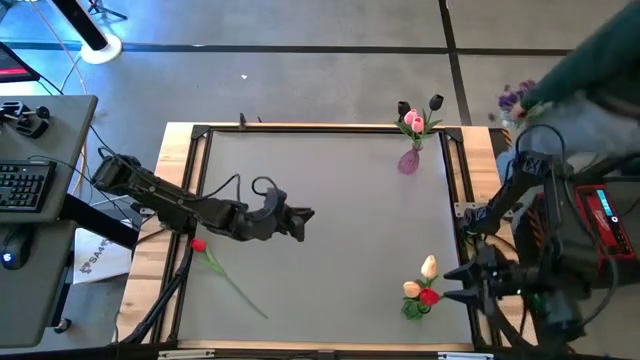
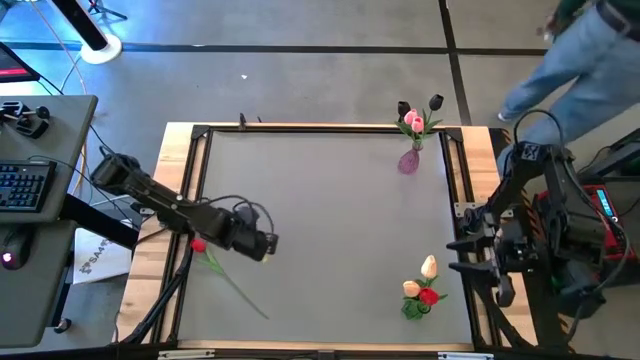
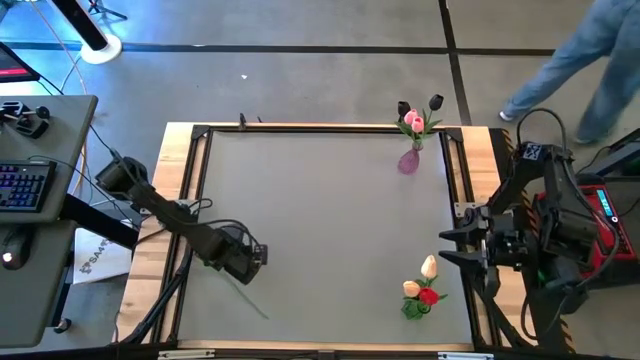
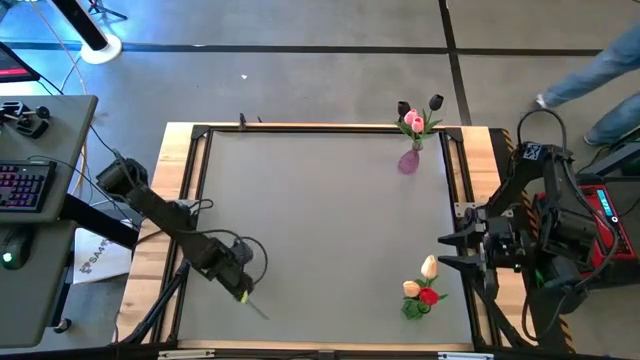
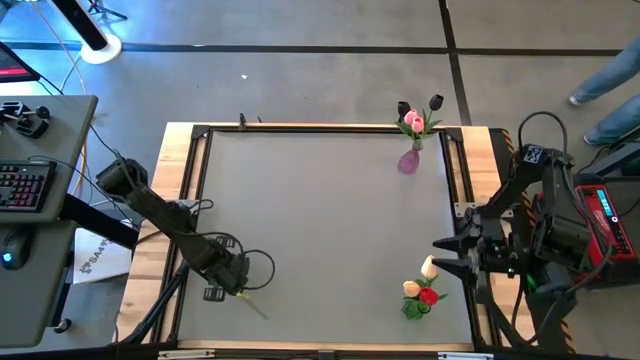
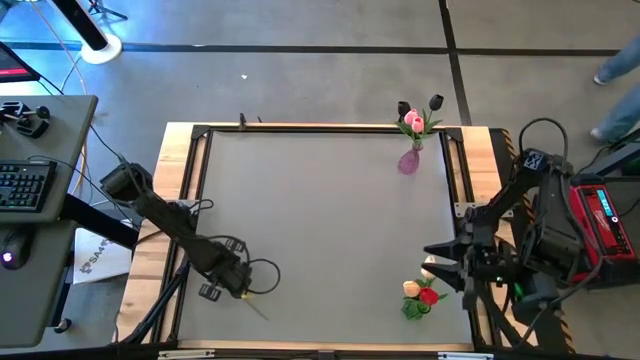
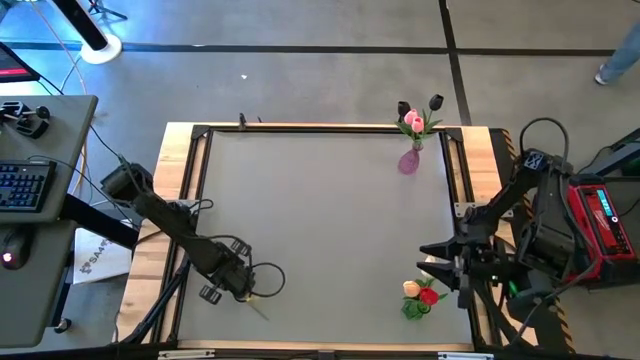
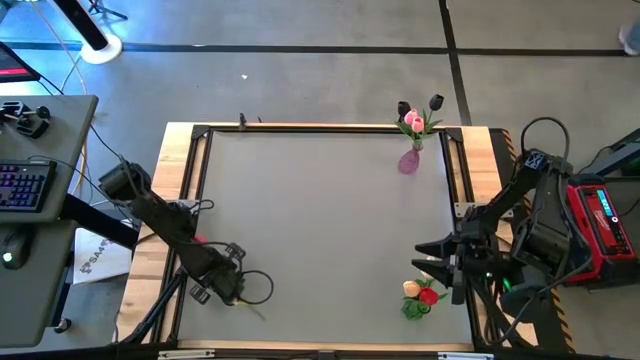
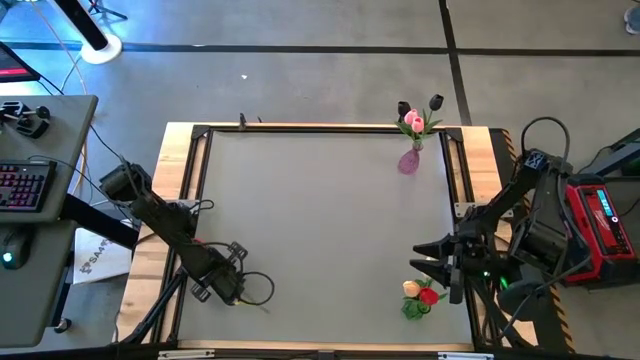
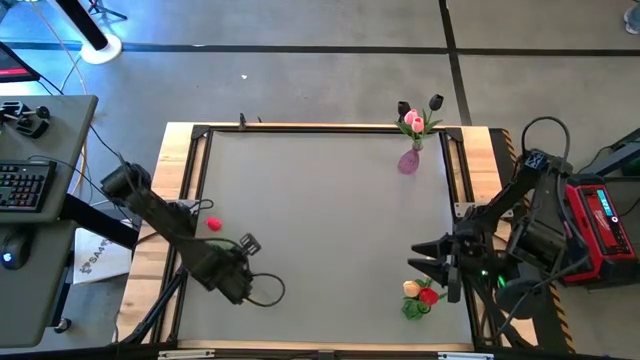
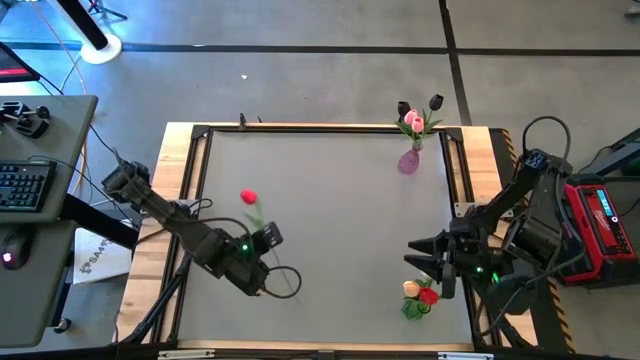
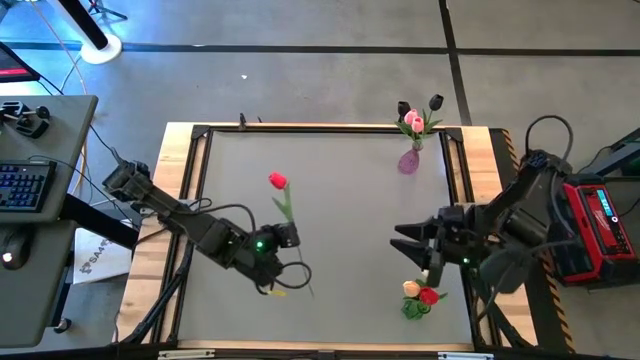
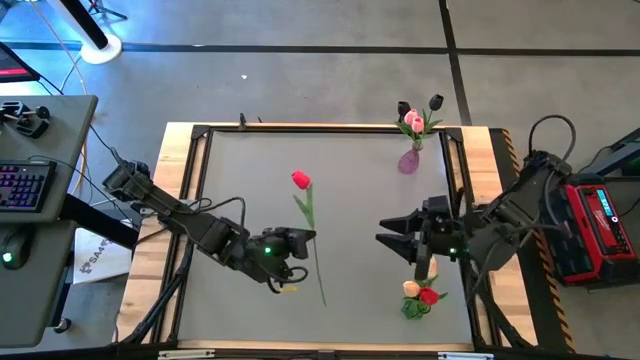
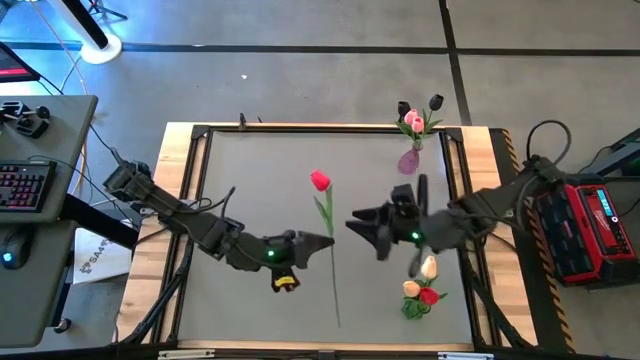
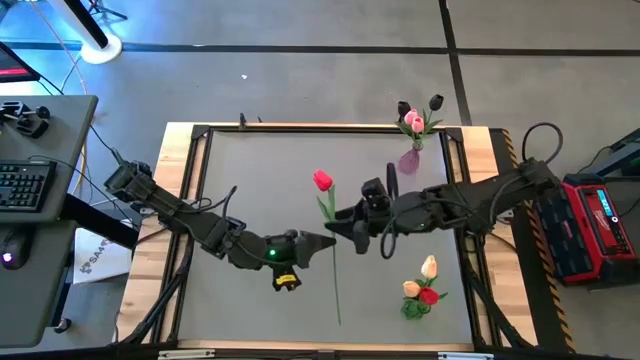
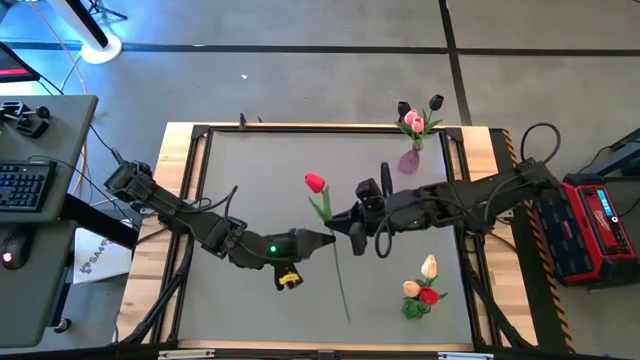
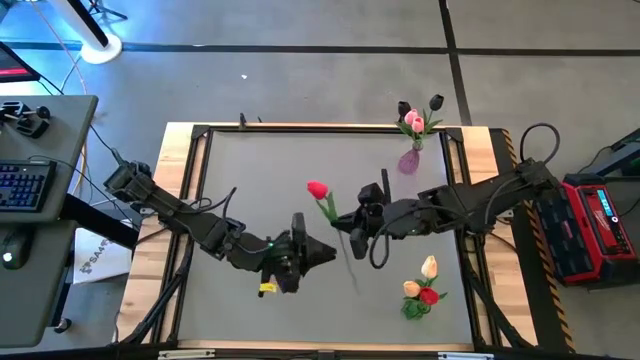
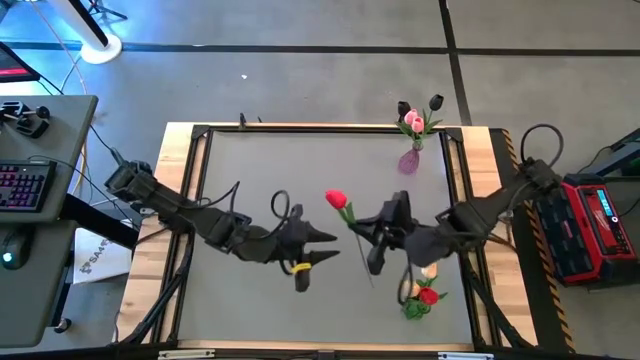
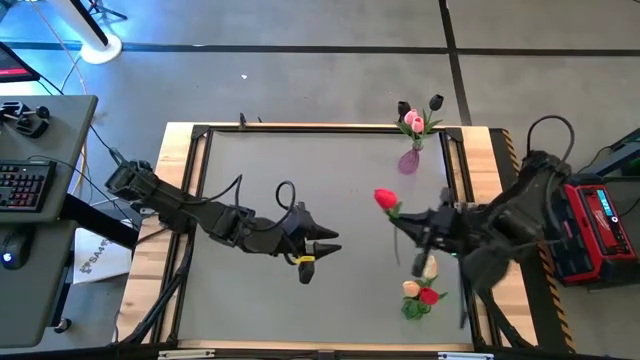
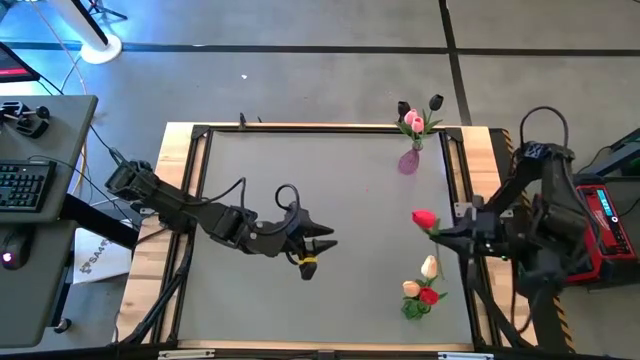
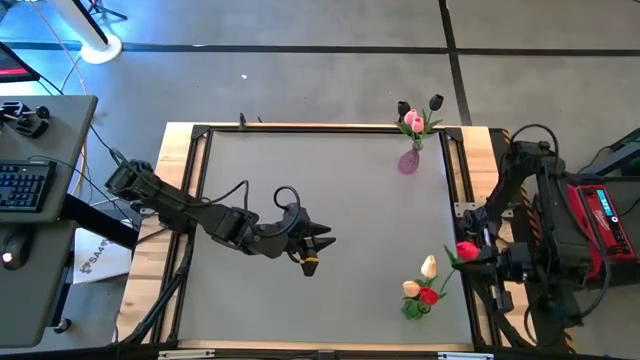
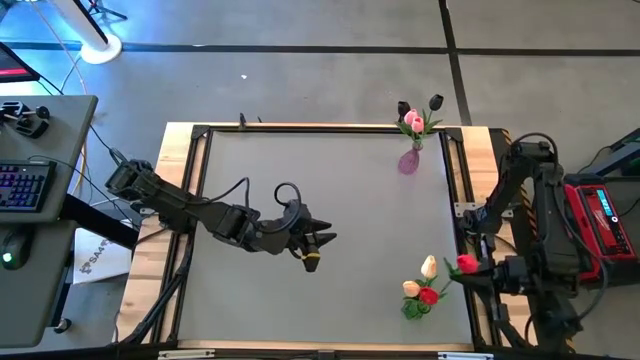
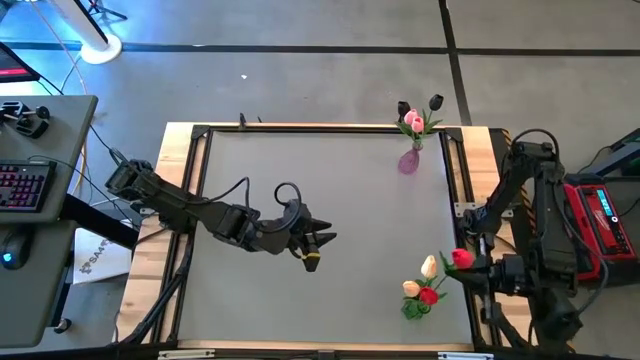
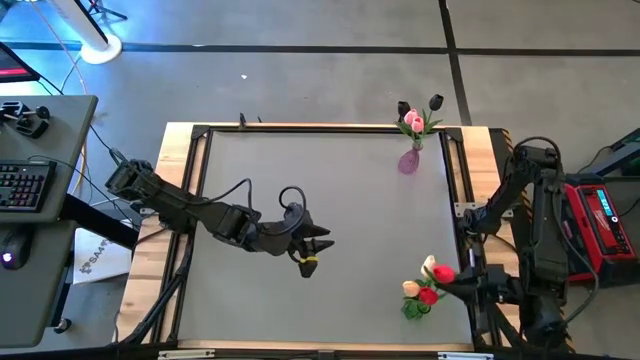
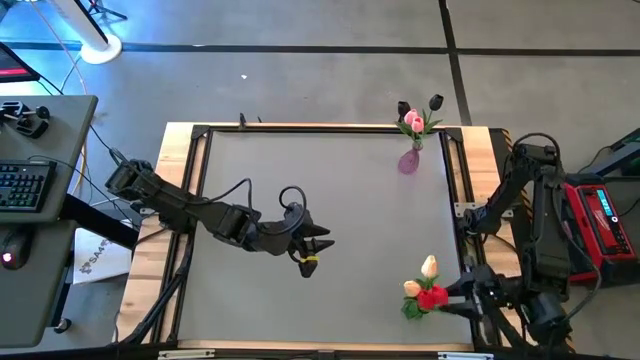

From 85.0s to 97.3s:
Task: Sort flowers into vase by color
Put the red tulip into the green vase

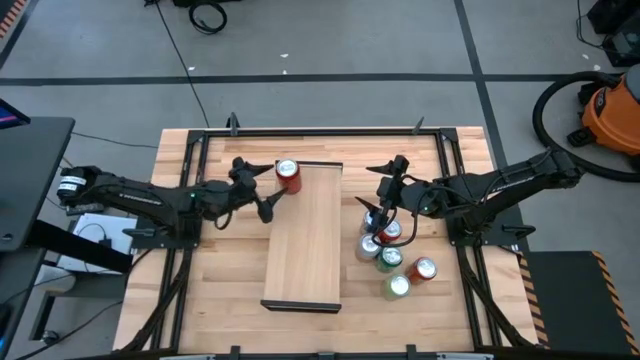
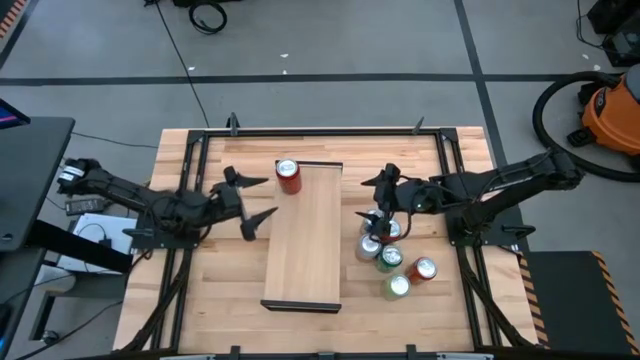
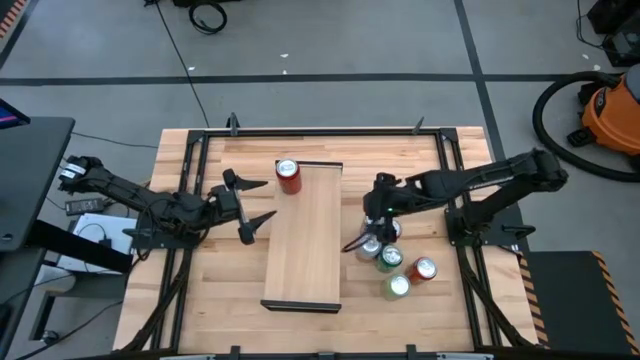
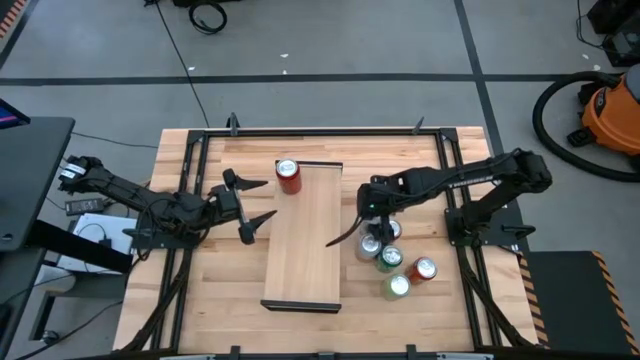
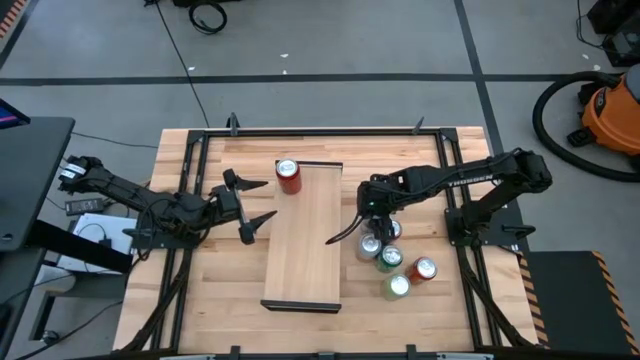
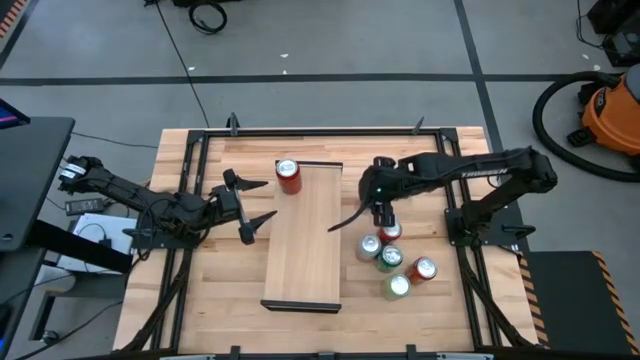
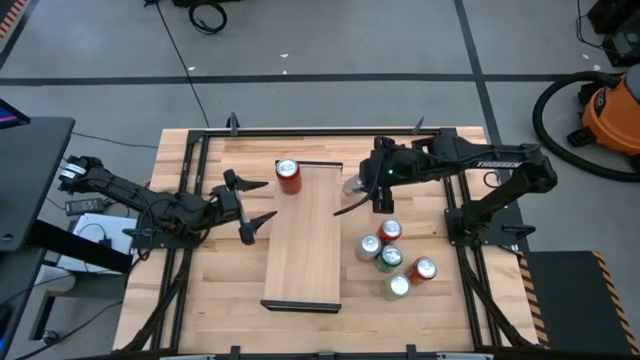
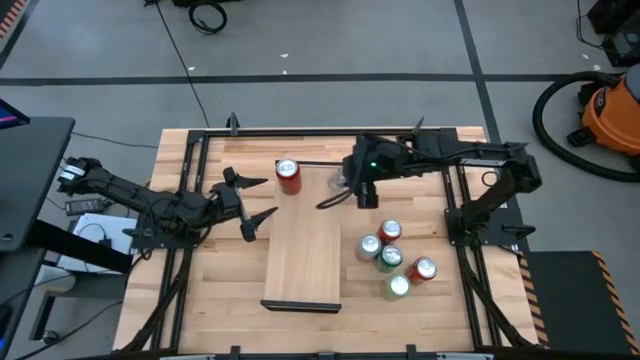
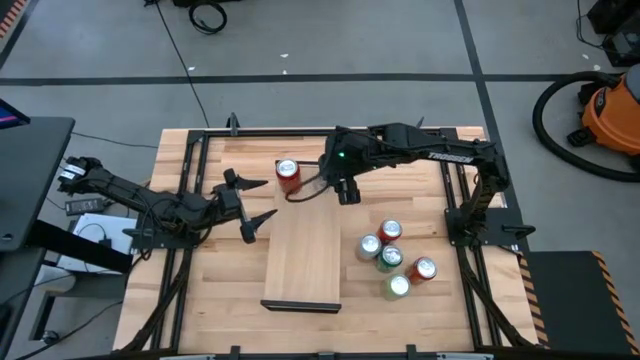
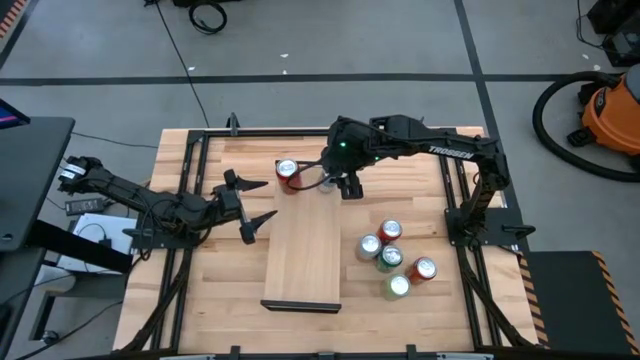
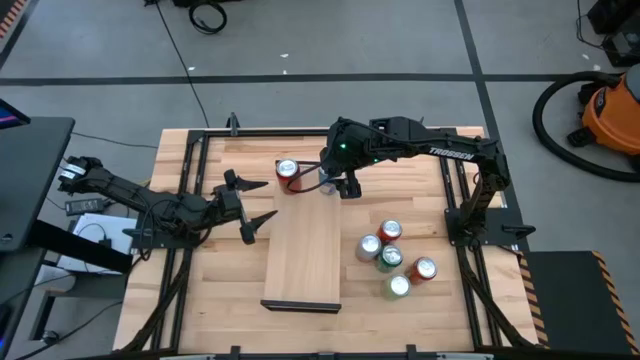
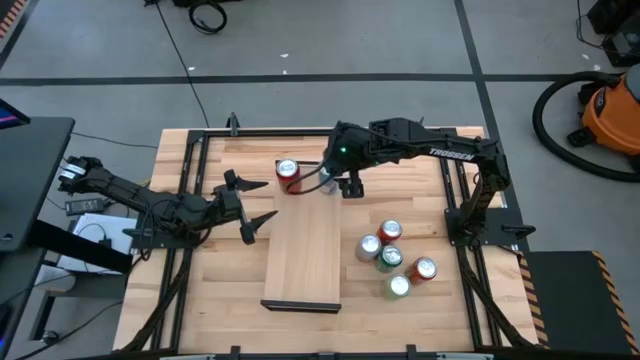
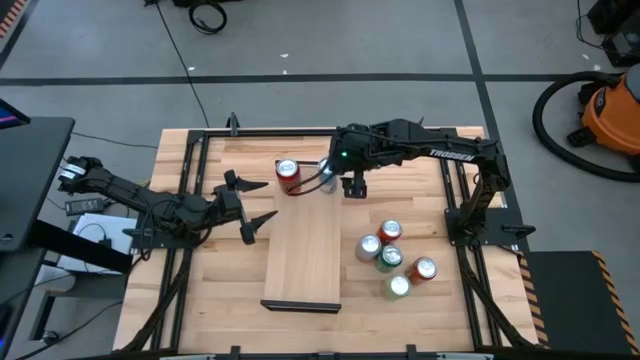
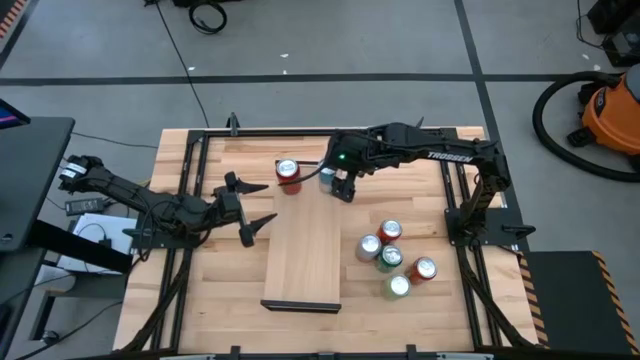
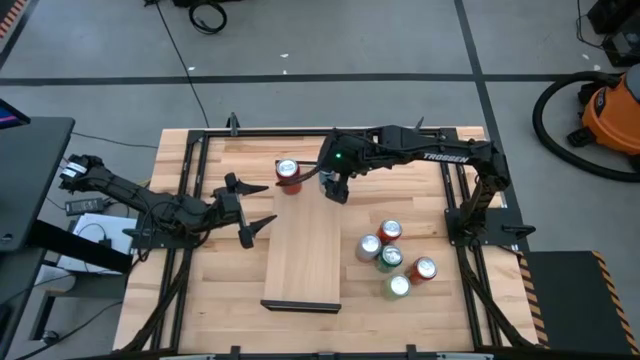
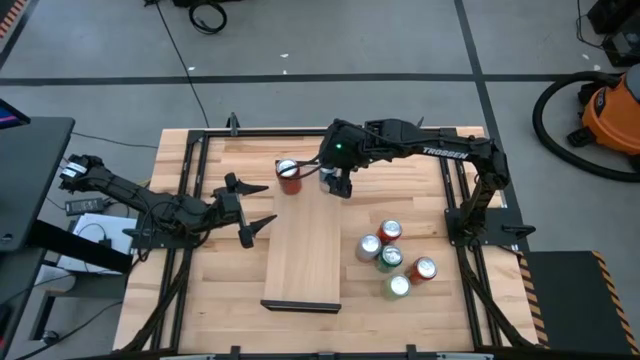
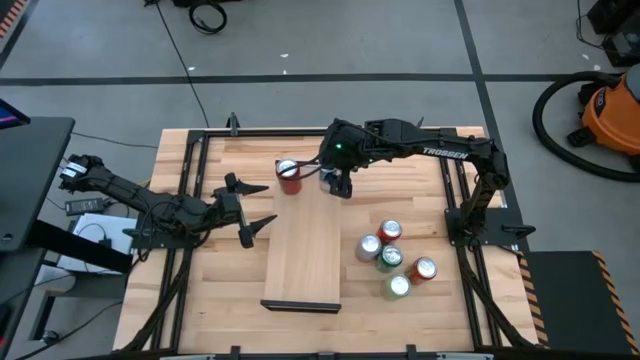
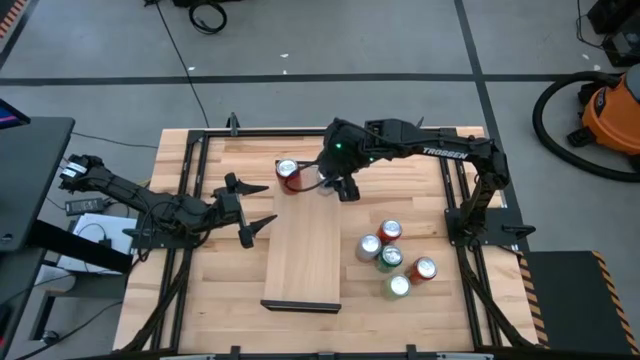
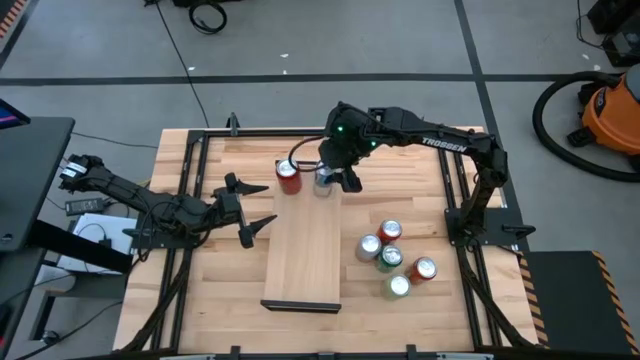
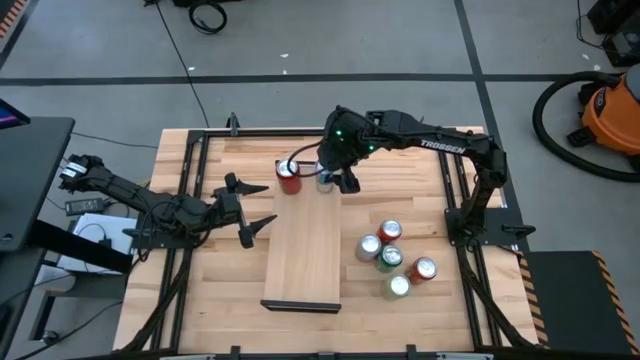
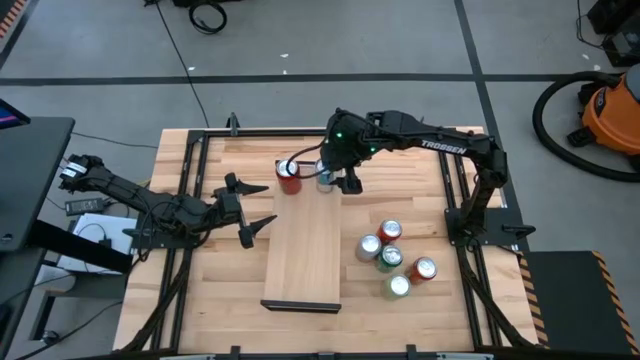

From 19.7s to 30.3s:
Task: Place canned beverage on shelf
Put the blue soda can on the shelf
